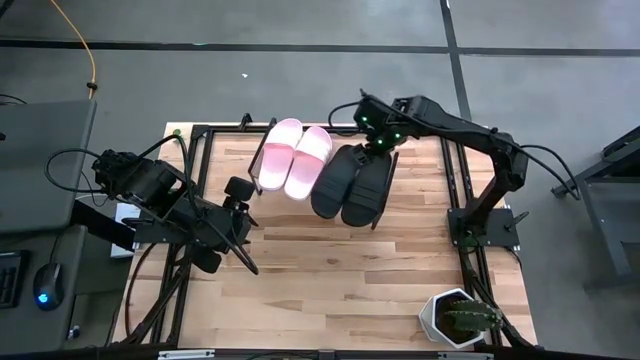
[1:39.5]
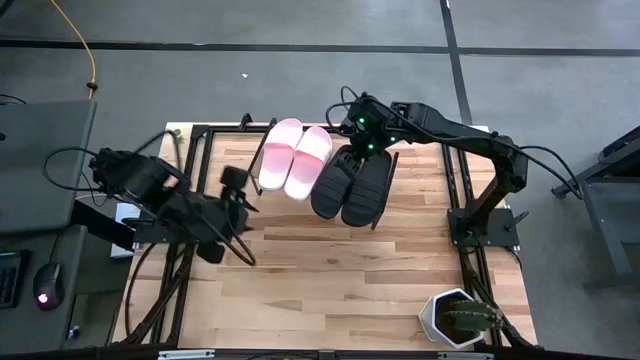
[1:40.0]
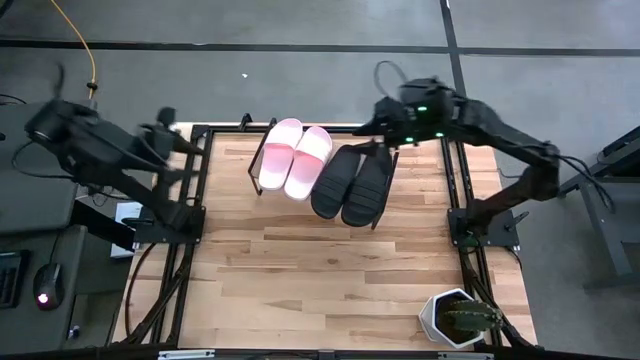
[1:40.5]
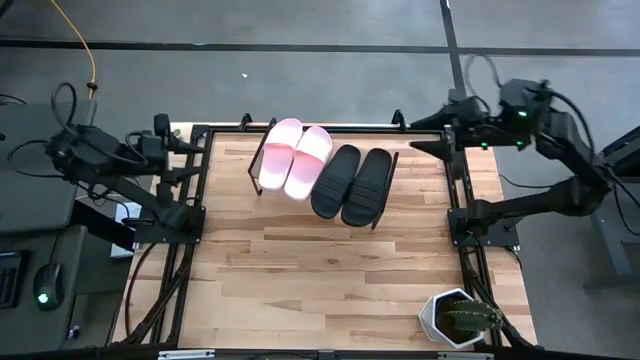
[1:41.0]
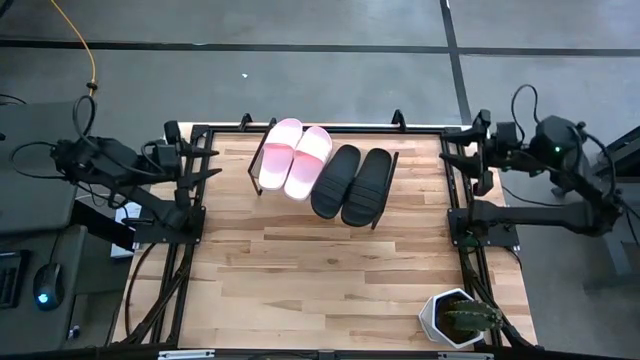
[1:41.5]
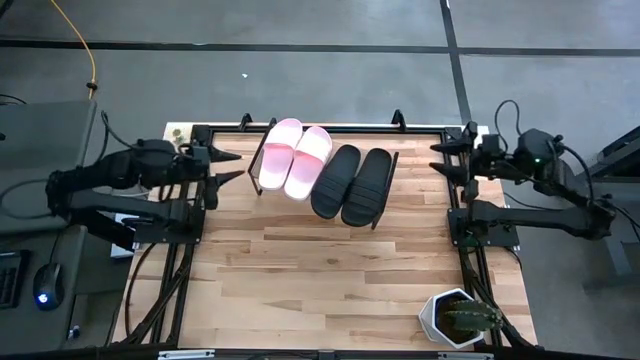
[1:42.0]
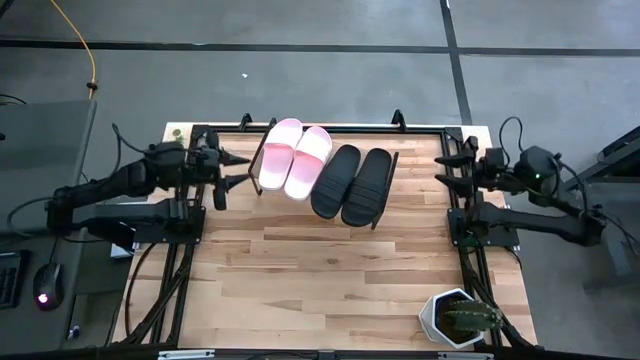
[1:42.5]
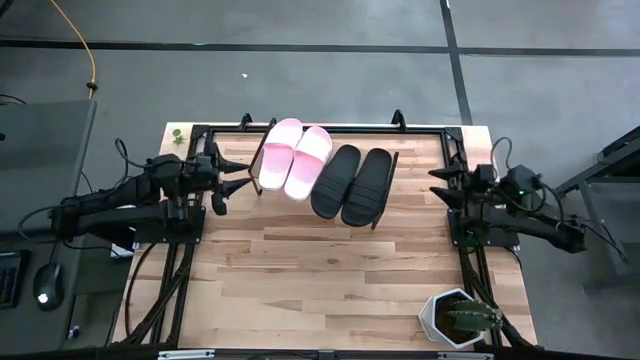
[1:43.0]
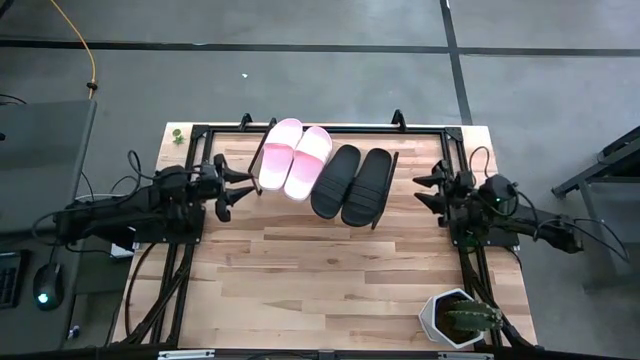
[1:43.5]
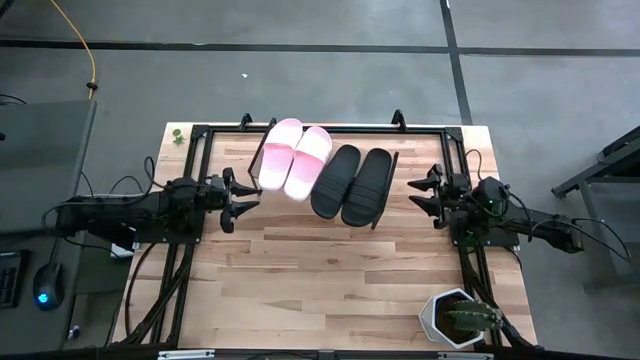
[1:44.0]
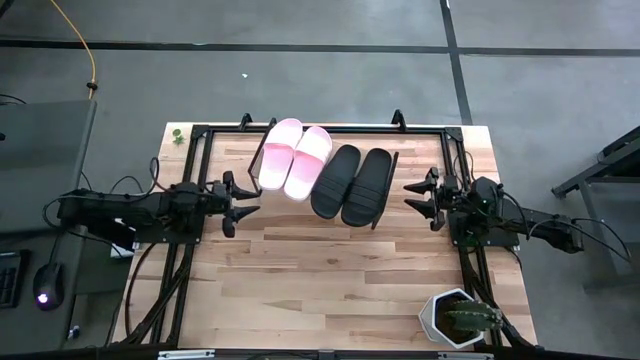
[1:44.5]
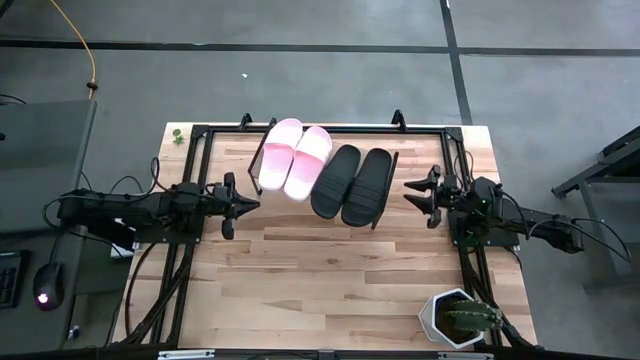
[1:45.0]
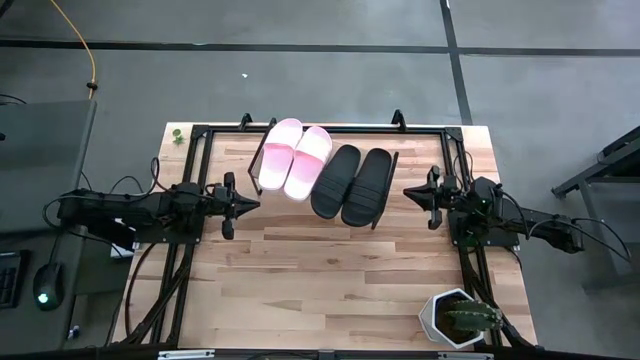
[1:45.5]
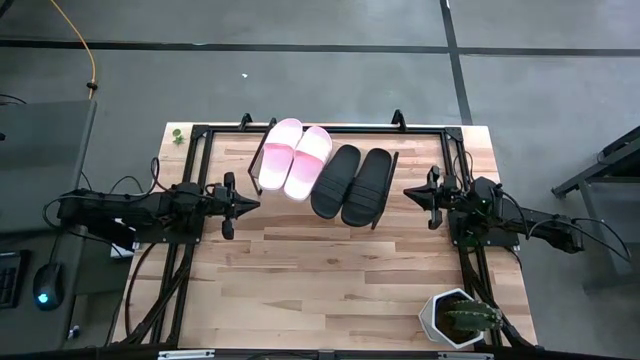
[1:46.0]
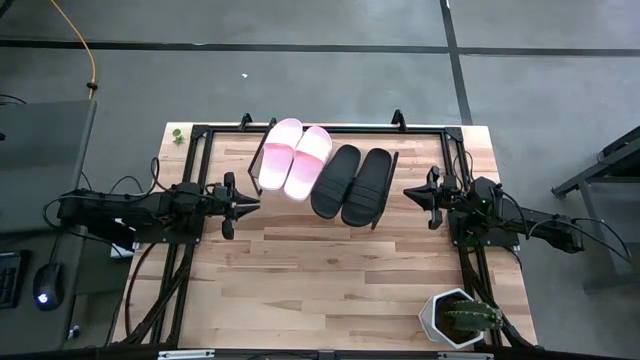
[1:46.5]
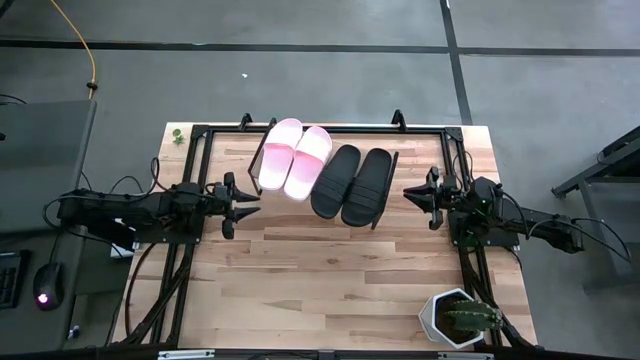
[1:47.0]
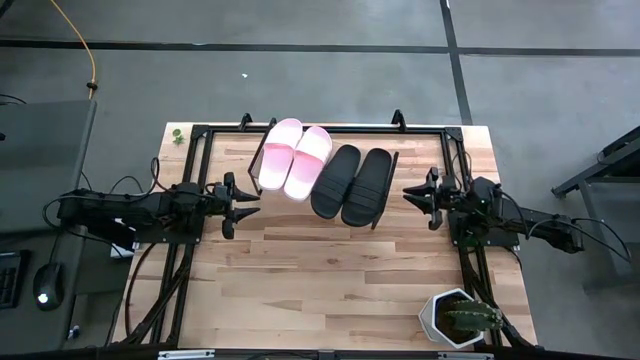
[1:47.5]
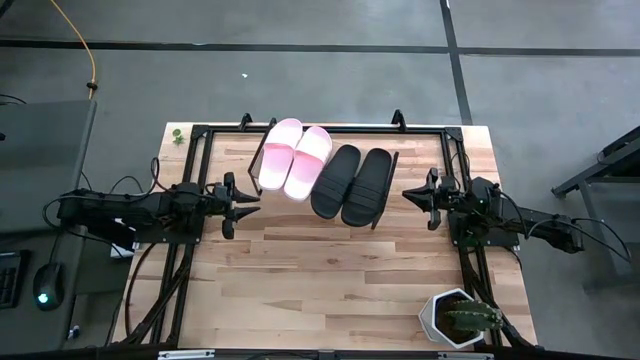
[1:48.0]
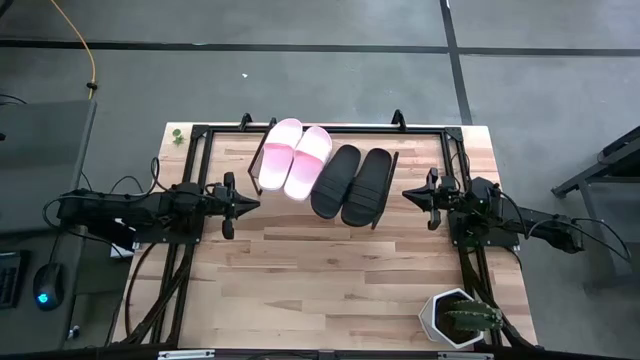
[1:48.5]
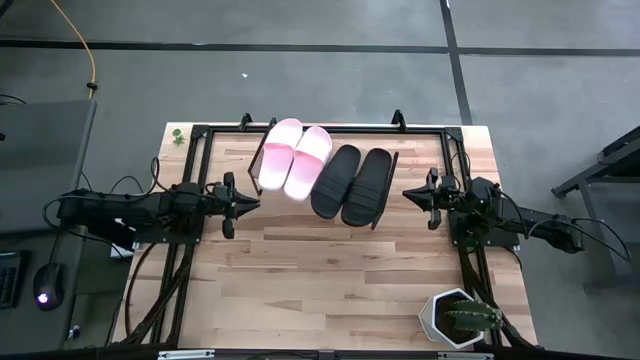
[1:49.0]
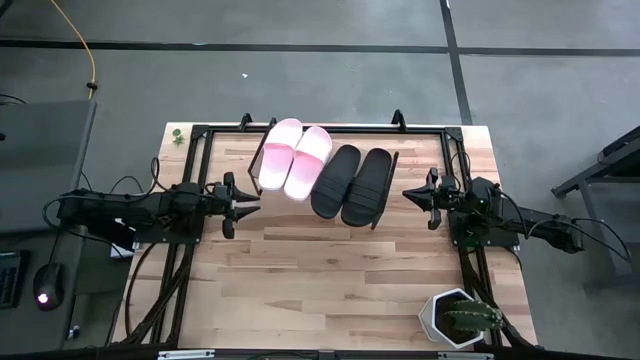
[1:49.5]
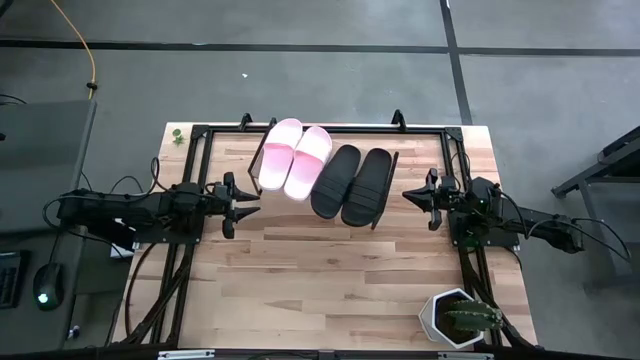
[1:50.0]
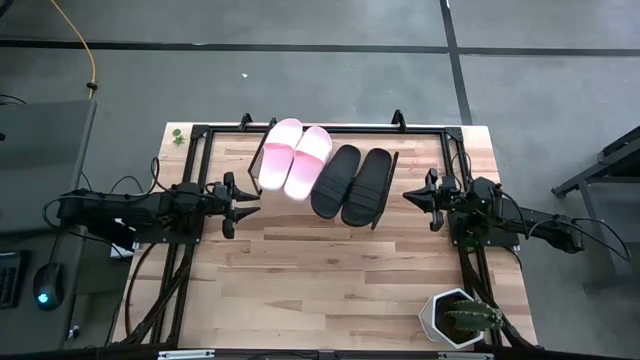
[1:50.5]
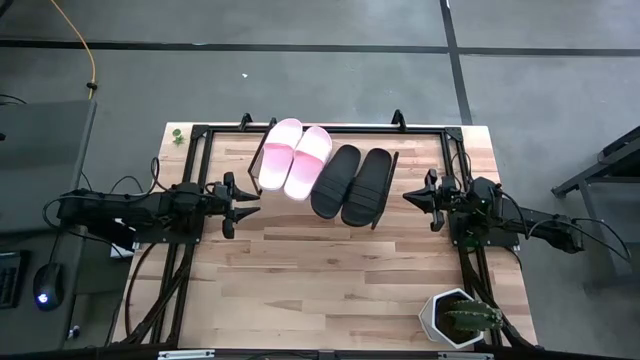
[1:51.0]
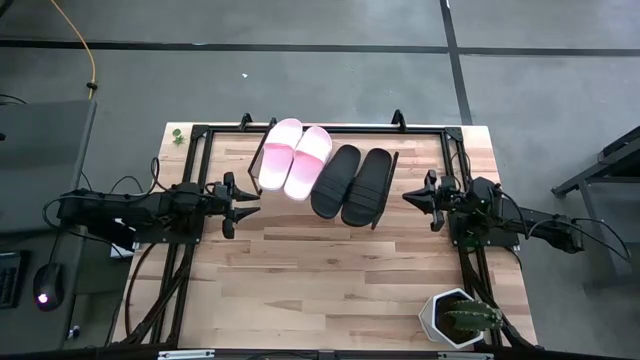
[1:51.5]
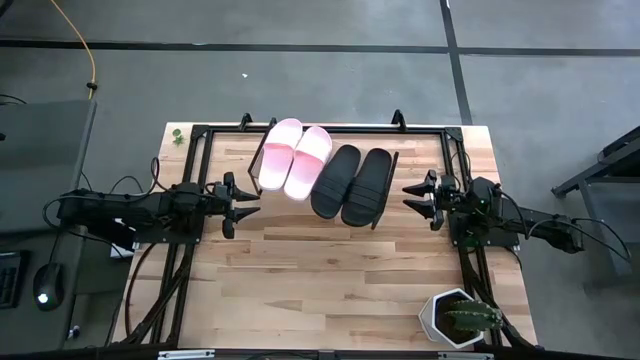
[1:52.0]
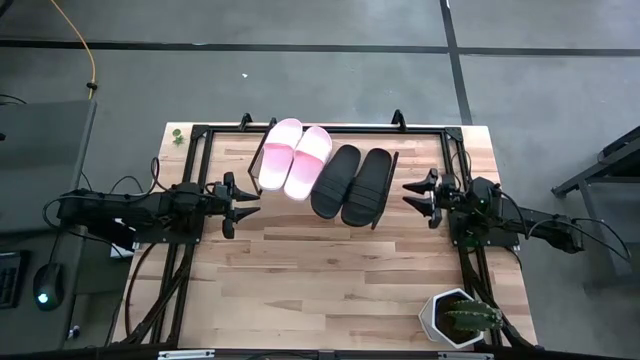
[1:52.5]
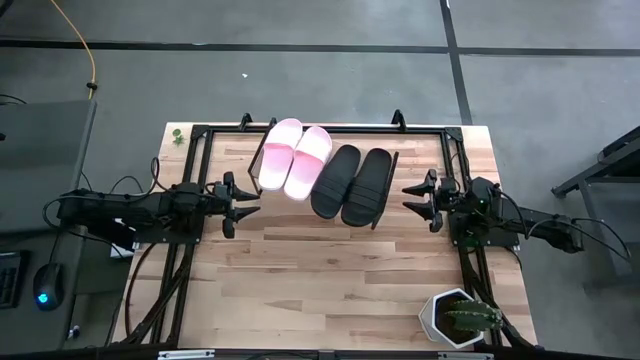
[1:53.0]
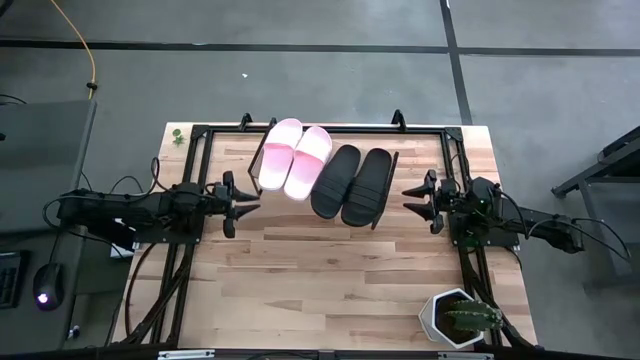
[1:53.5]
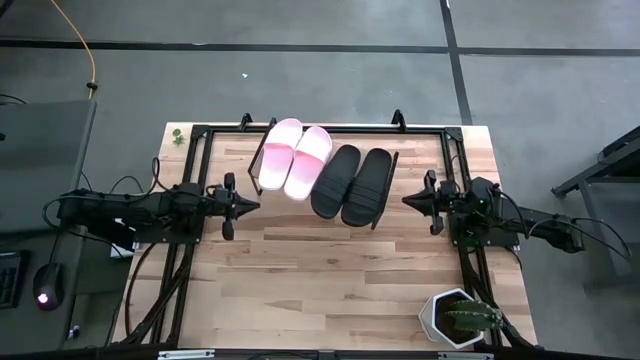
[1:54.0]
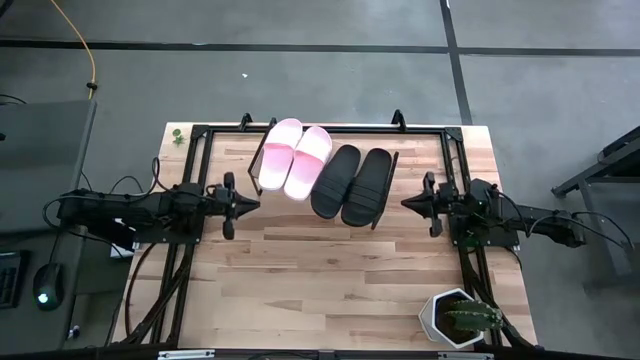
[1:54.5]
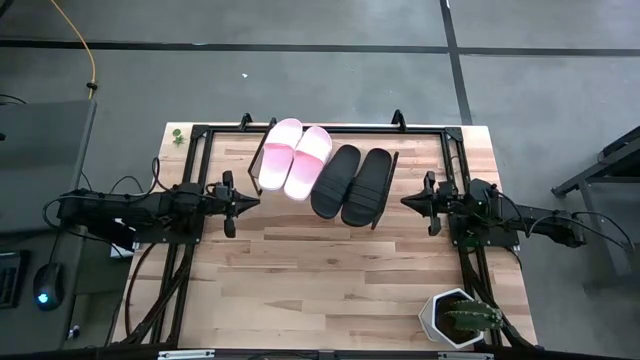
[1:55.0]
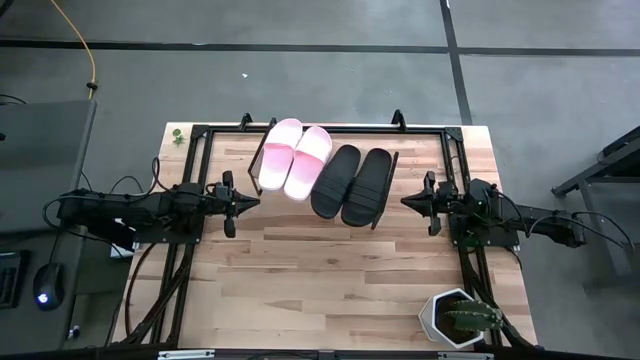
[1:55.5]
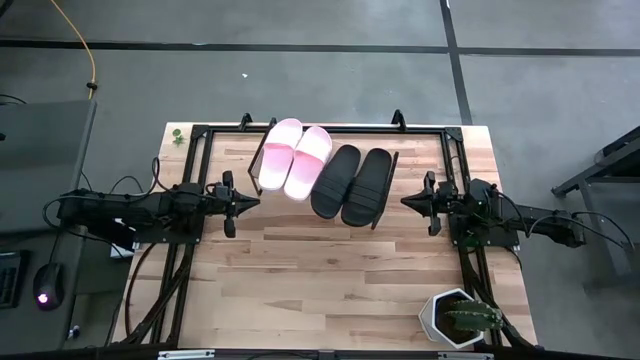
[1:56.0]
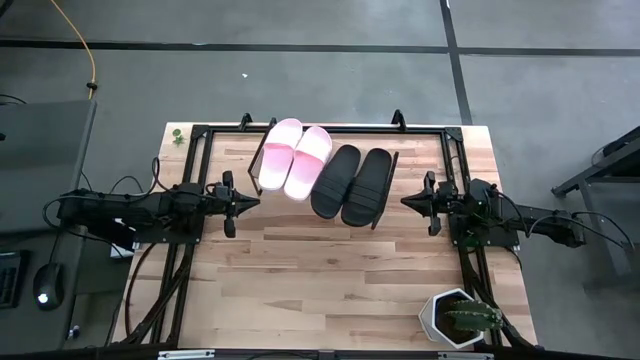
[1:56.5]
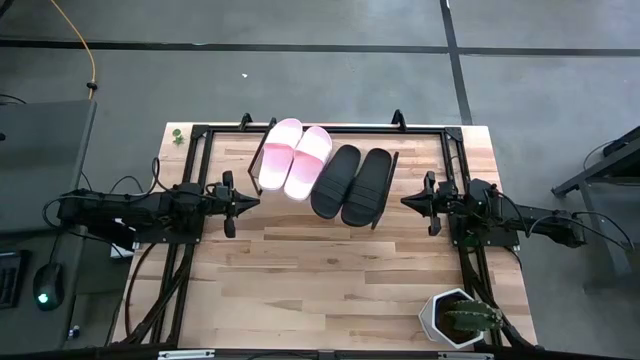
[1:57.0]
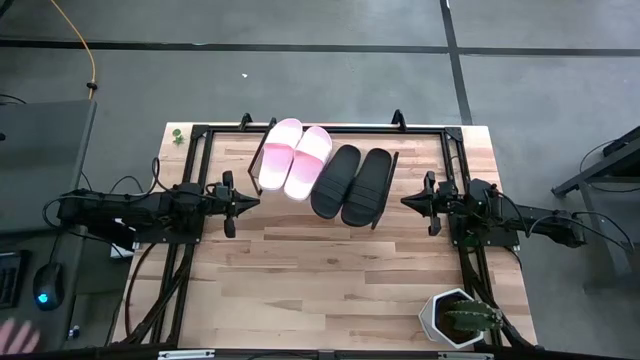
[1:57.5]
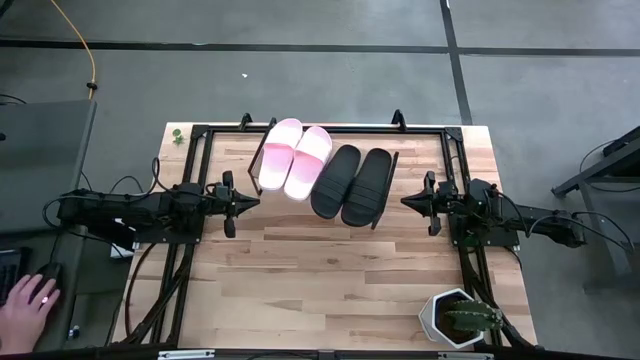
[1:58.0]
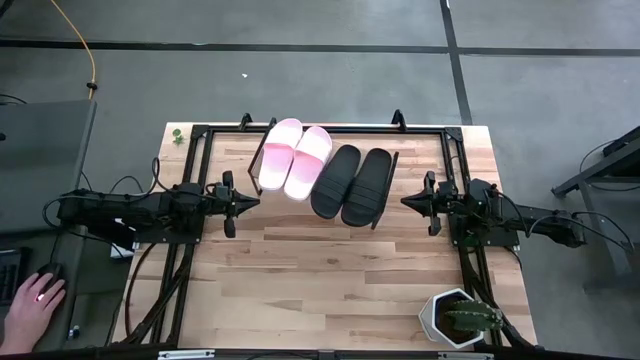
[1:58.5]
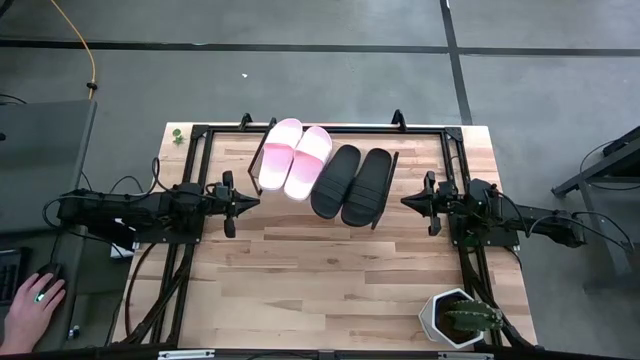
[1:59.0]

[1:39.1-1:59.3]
Task: Pick and place slides into the shelf
Return to Home Position
